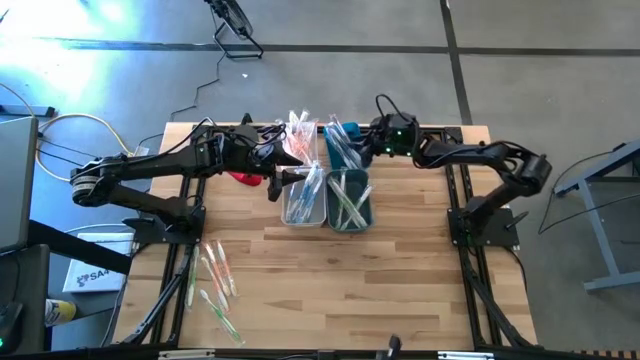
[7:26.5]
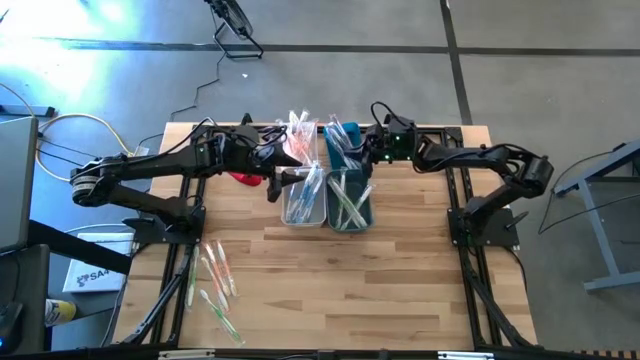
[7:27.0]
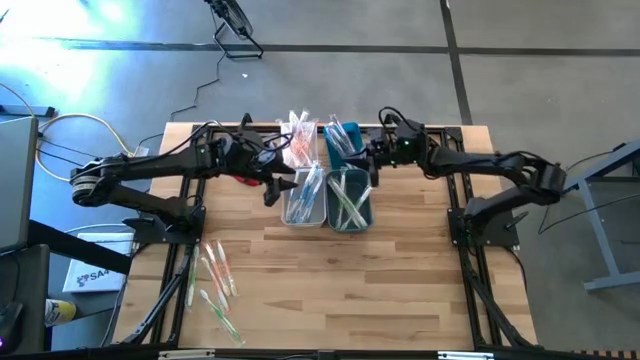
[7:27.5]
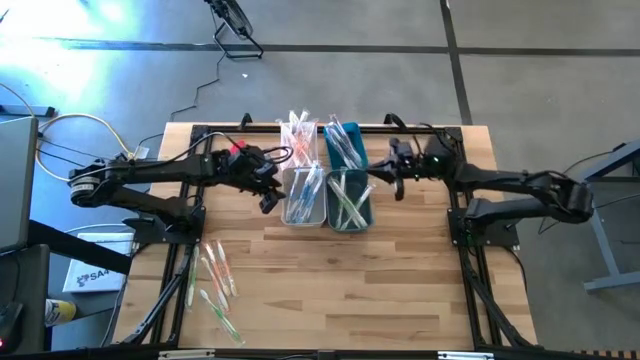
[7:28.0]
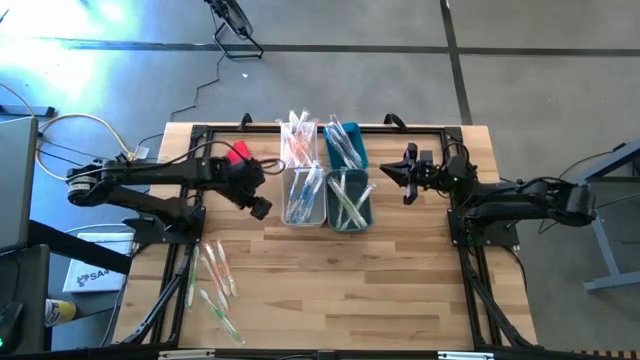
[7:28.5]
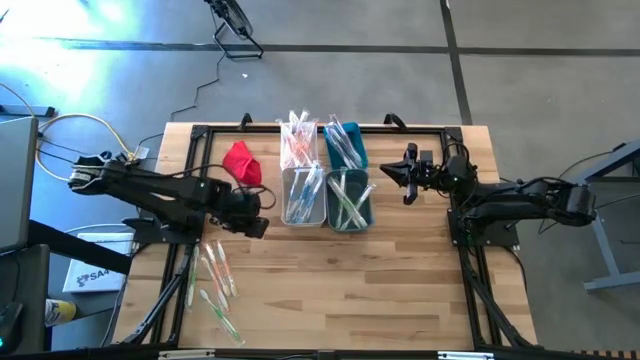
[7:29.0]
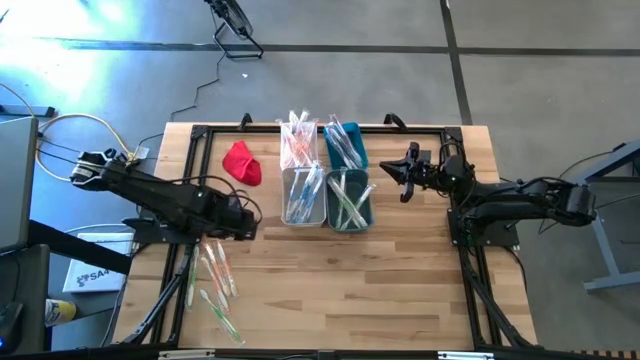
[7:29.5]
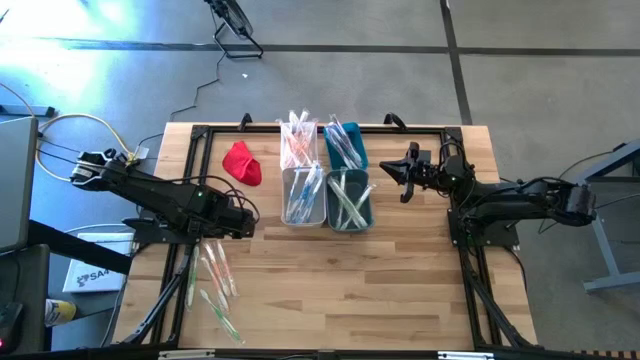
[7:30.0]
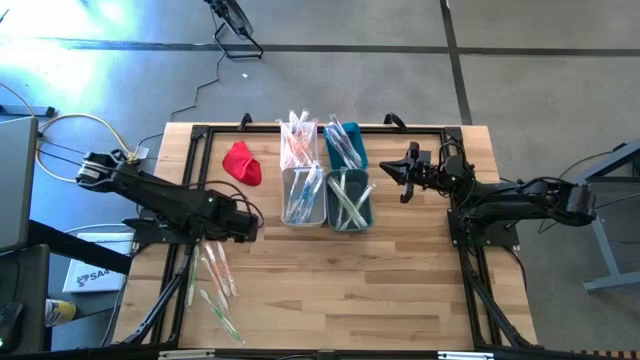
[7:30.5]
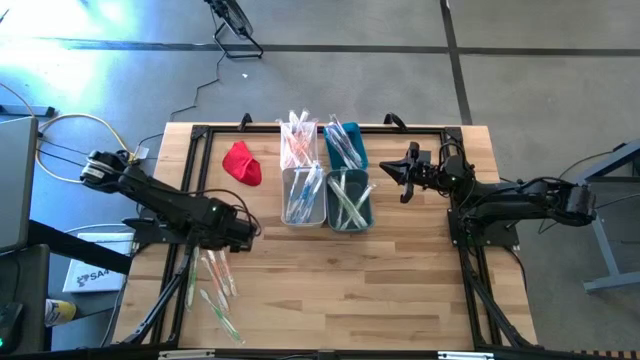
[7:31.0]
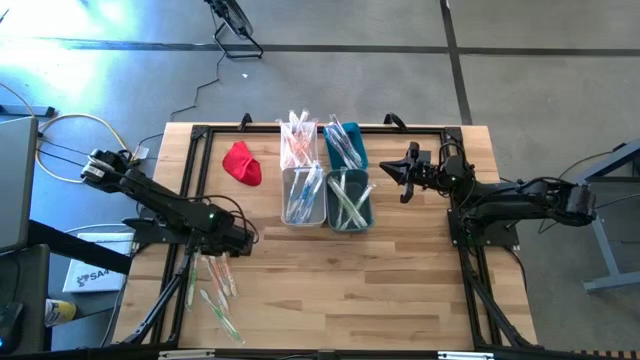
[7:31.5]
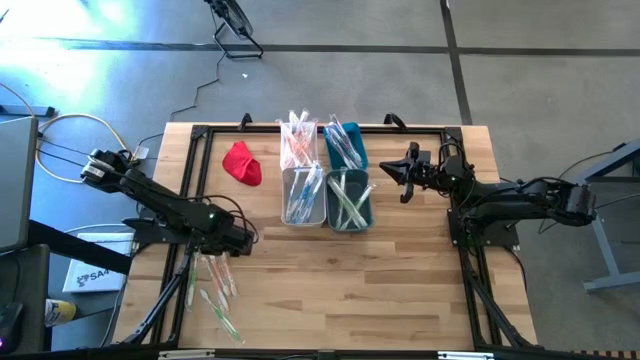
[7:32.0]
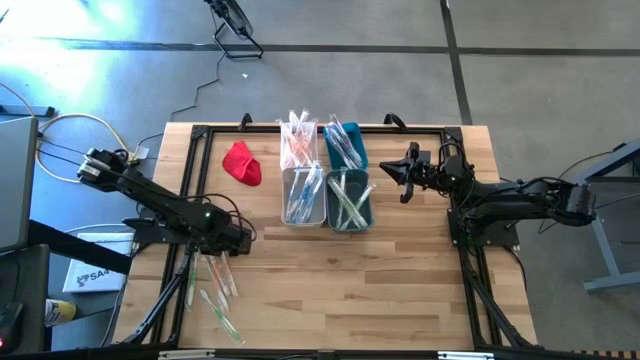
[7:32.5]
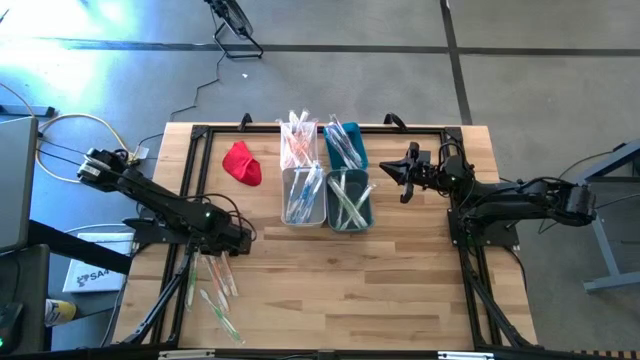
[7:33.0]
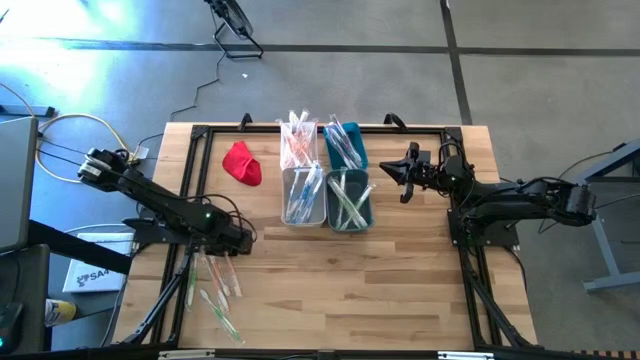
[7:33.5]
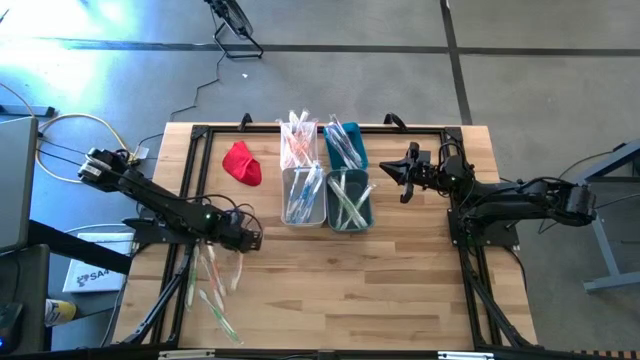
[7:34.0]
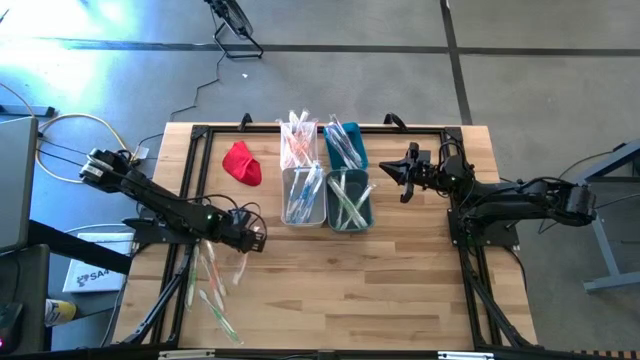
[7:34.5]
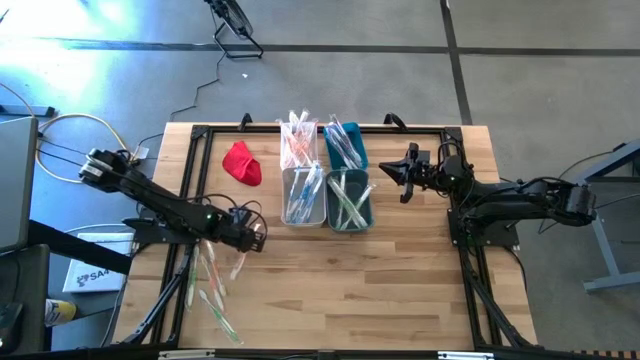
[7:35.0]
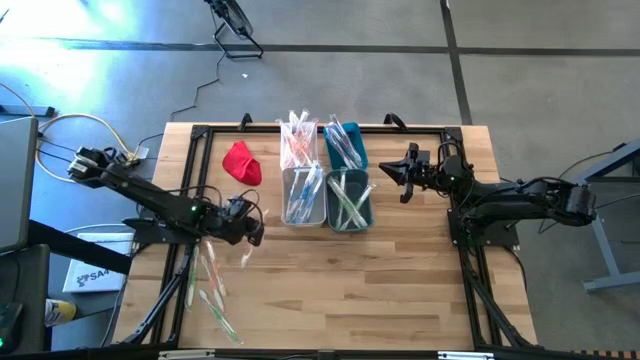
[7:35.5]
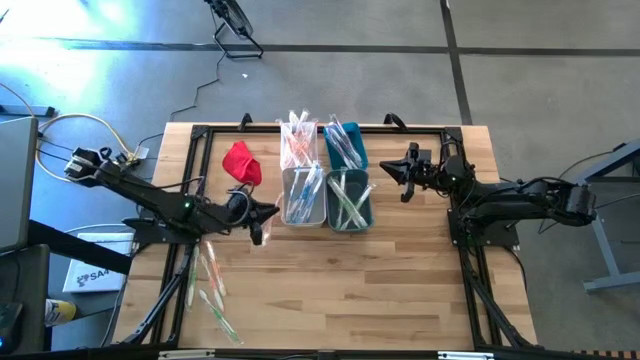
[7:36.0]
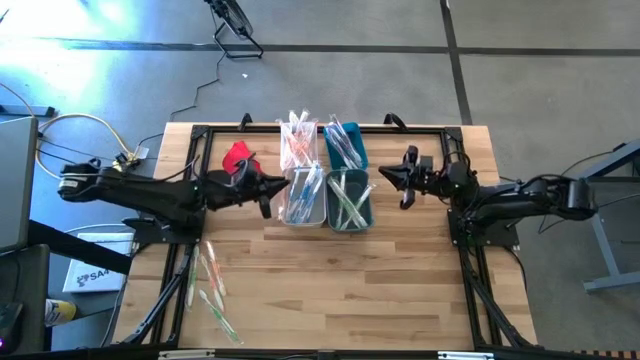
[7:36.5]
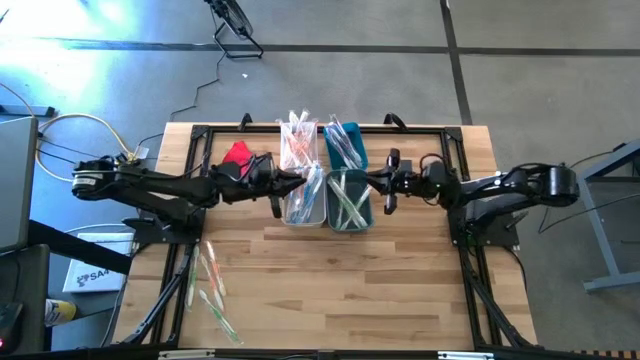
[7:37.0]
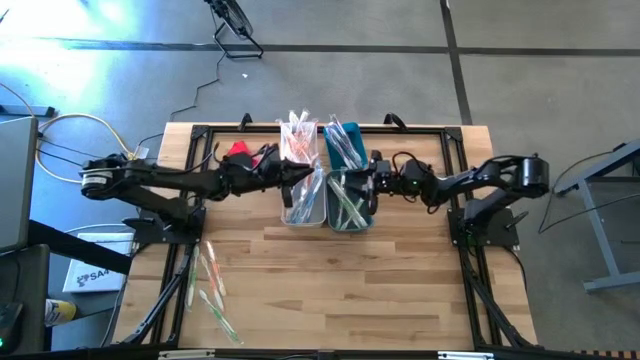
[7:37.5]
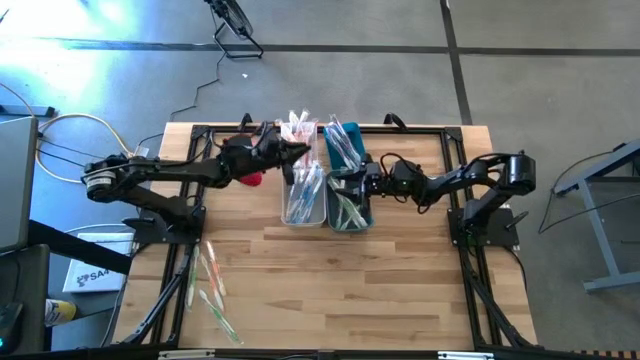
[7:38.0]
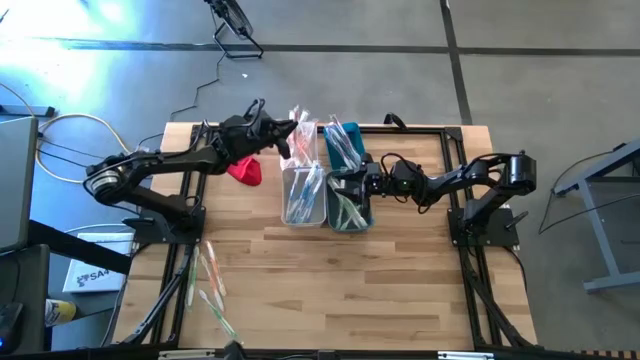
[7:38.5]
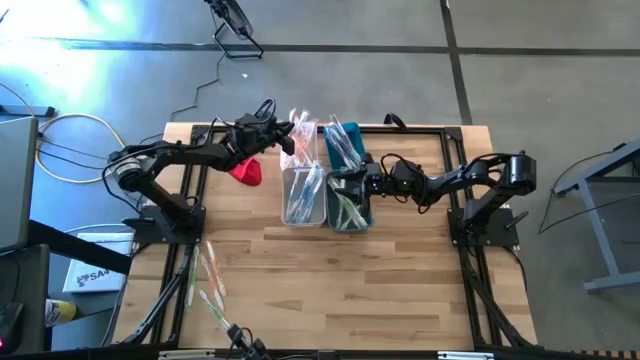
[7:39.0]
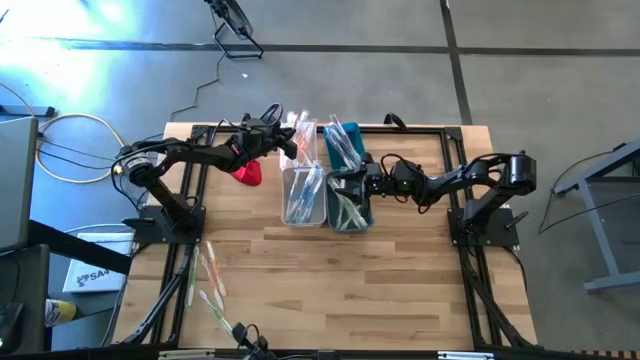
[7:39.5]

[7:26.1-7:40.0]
Task: Pick & Place Toothbrushes
Put the orange toothbrush into the transparent bin
